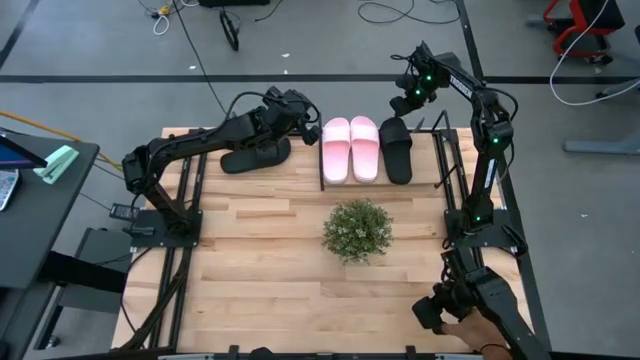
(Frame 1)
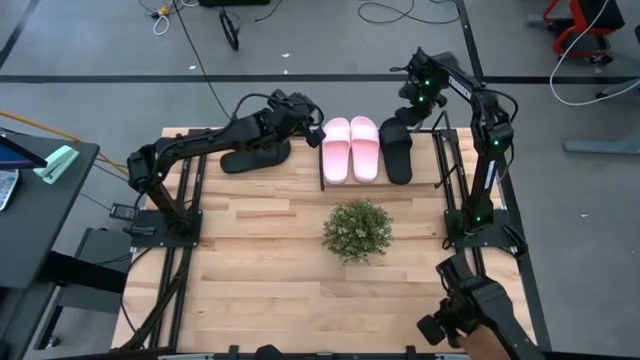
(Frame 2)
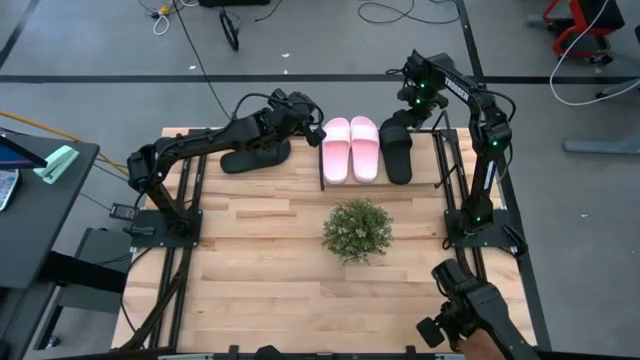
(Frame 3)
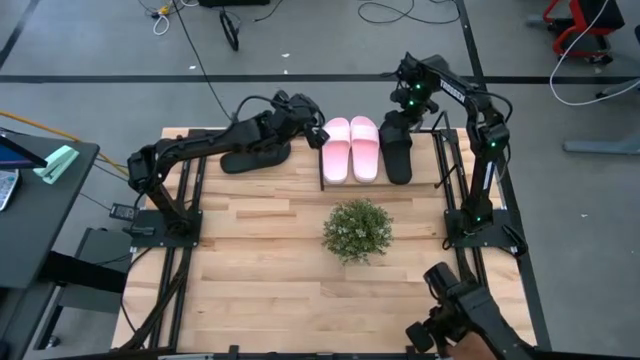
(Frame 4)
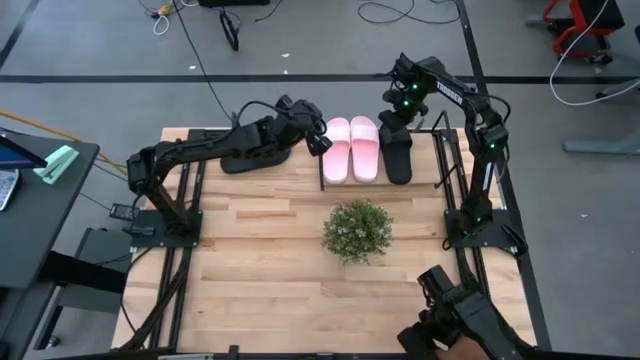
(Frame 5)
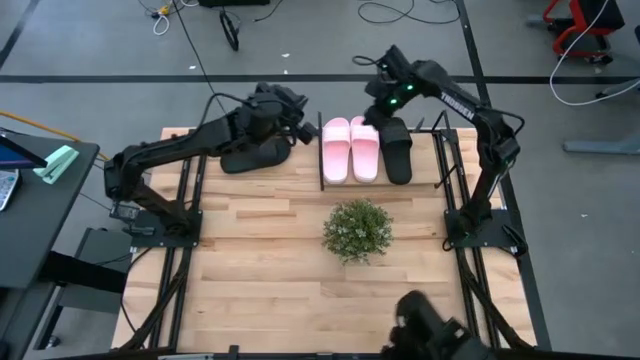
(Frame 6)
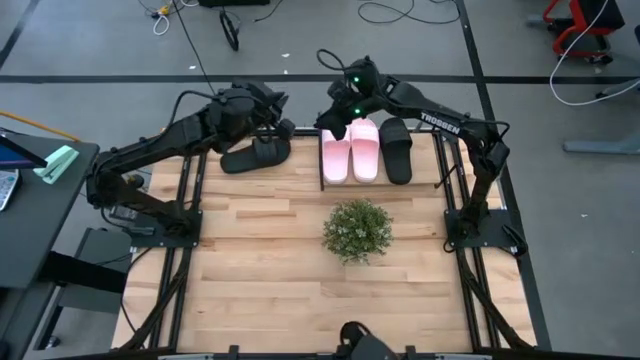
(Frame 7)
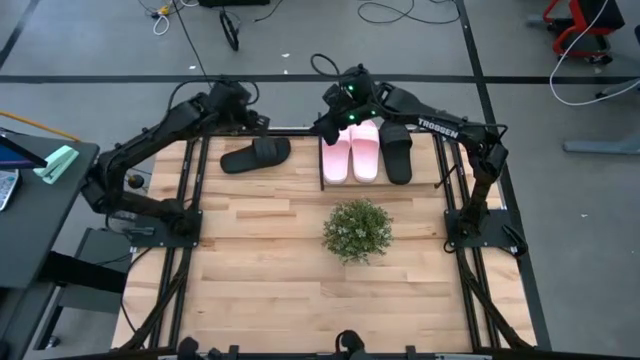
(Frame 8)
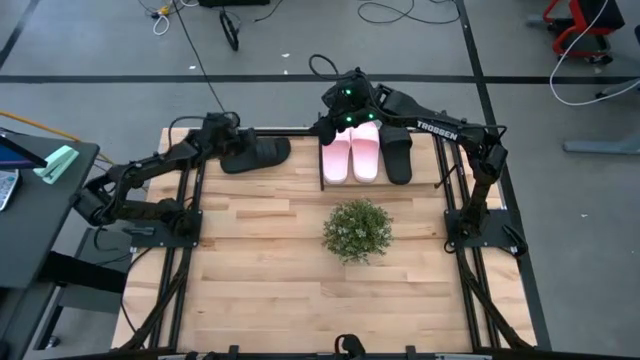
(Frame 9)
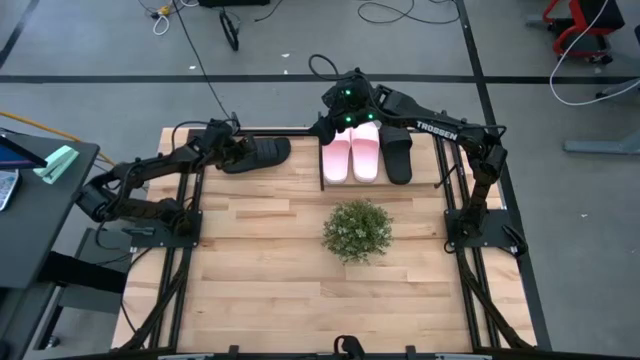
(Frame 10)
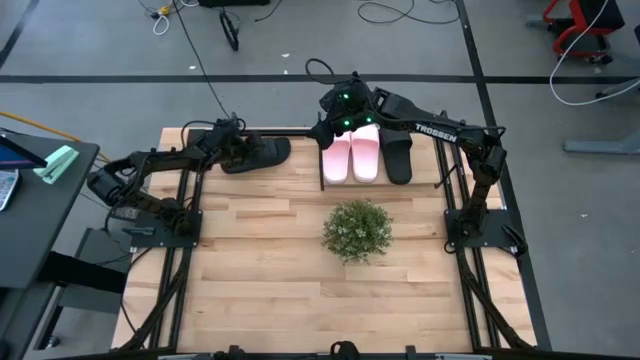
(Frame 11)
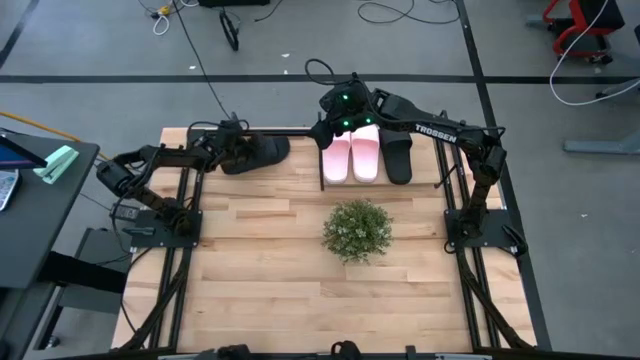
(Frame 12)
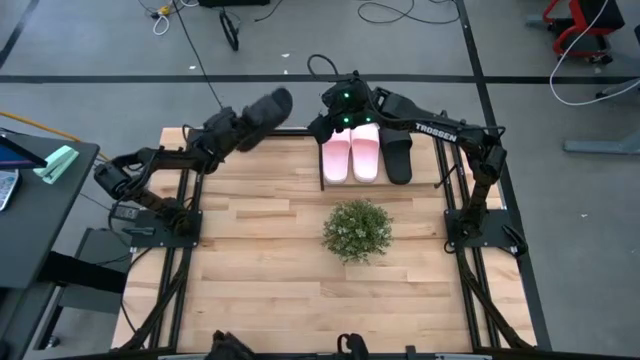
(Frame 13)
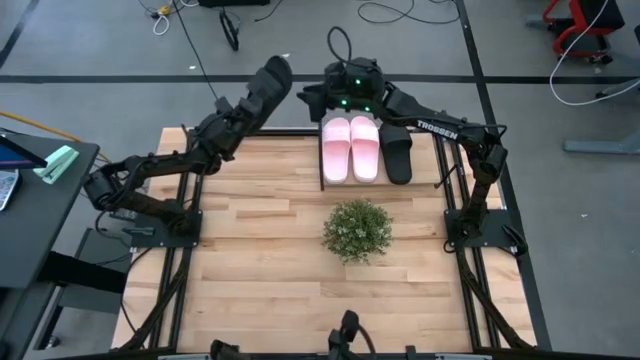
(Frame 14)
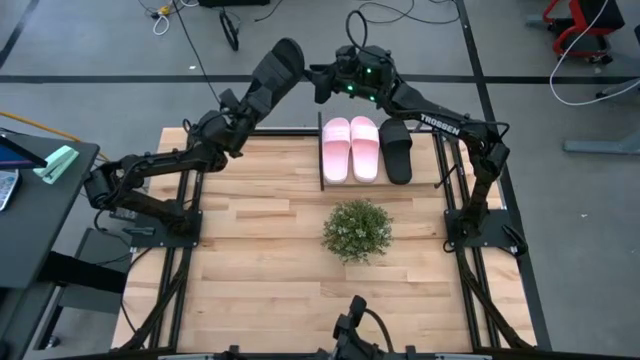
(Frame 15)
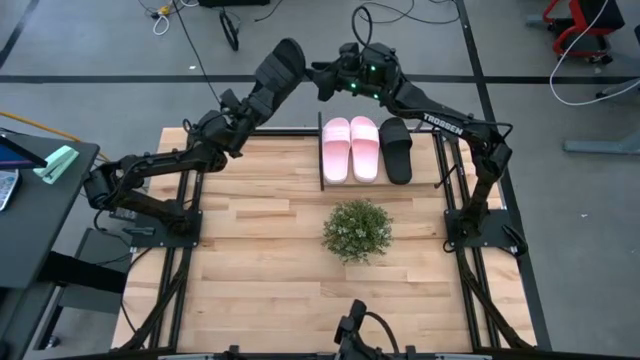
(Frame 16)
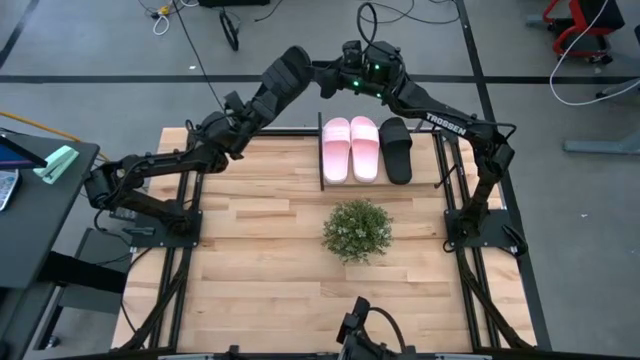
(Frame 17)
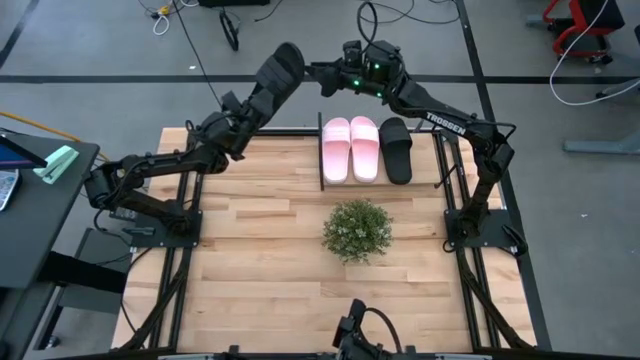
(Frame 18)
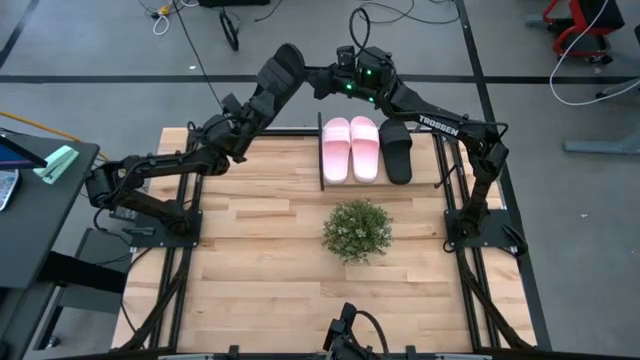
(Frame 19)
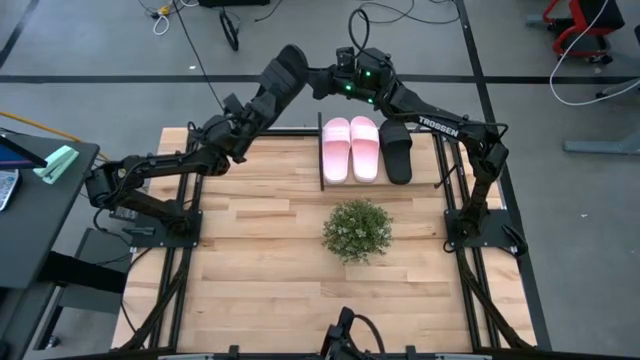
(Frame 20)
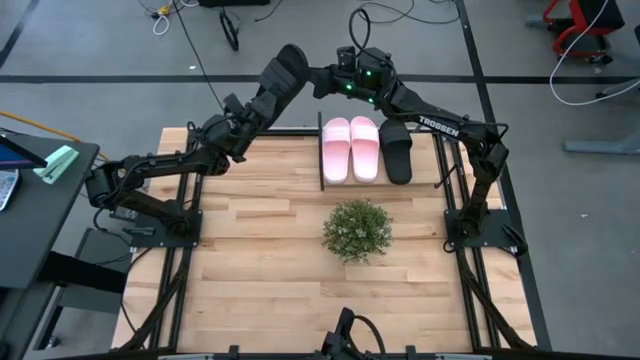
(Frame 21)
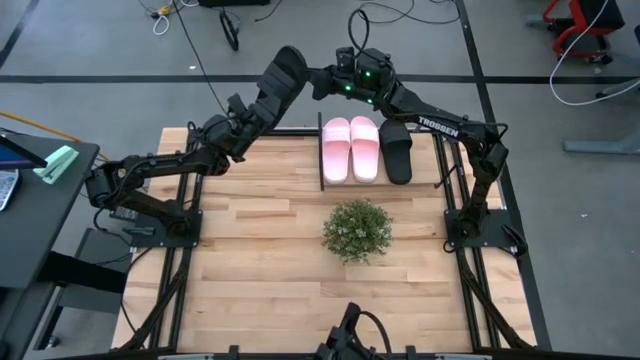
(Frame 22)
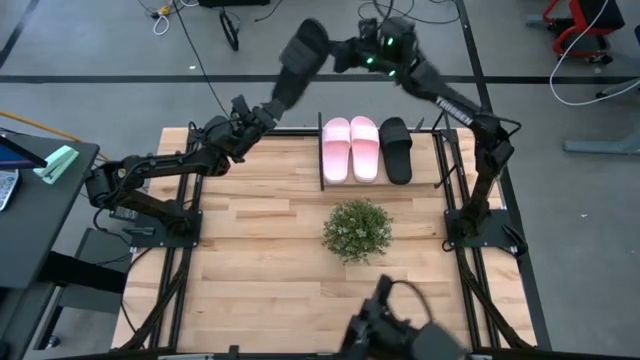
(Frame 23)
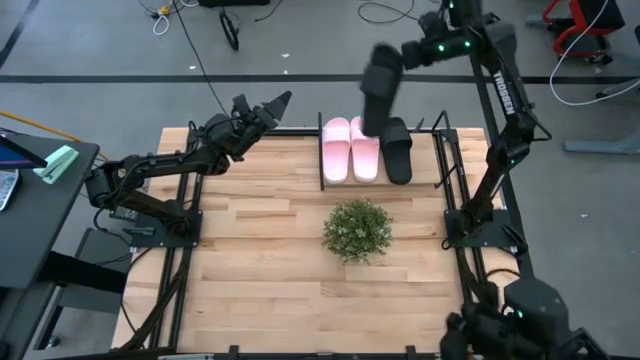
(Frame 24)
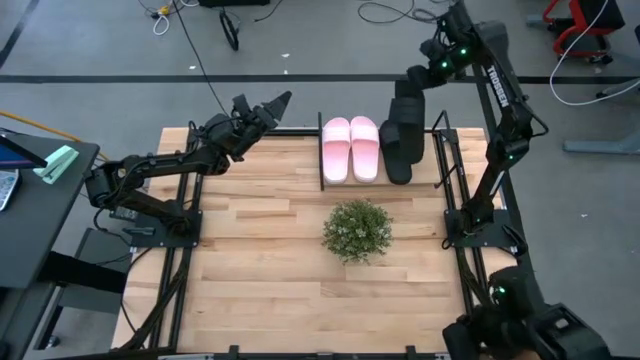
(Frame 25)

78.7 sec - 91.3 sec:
Task: Pick and place slides into the shelf
Put the black slide on the shelf

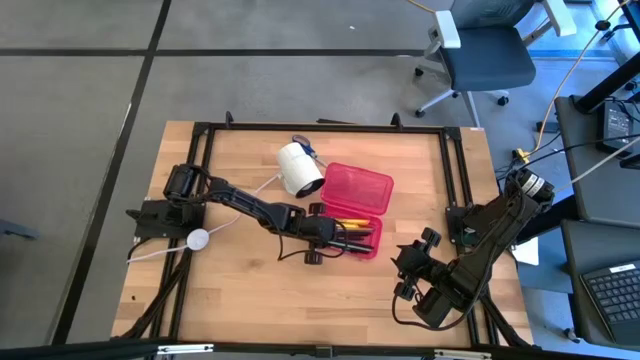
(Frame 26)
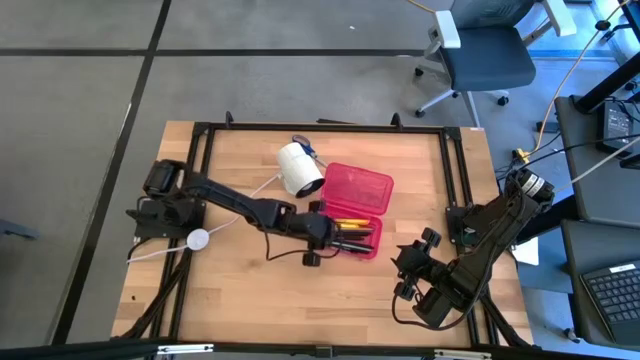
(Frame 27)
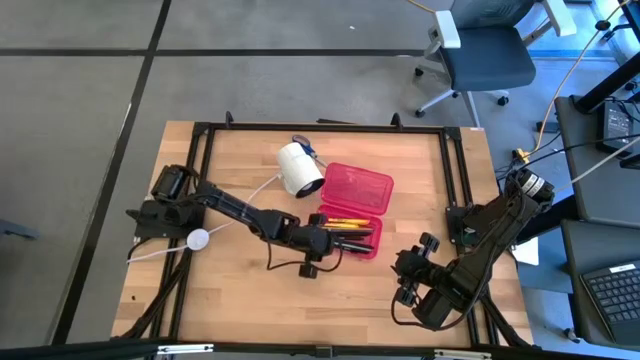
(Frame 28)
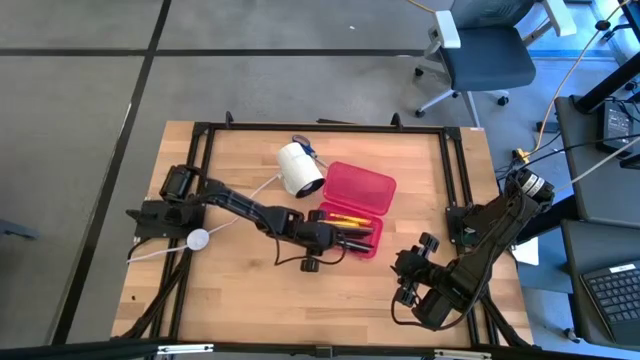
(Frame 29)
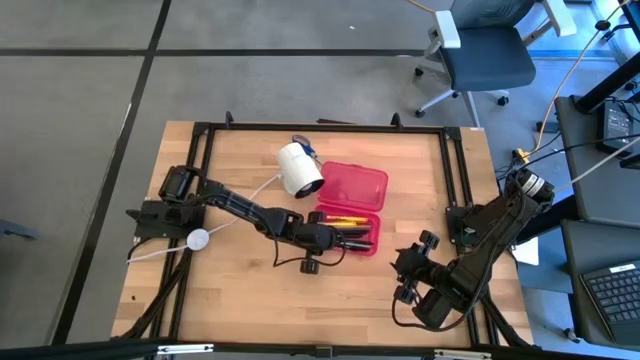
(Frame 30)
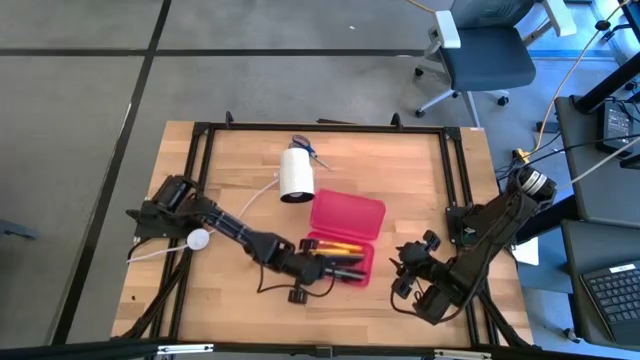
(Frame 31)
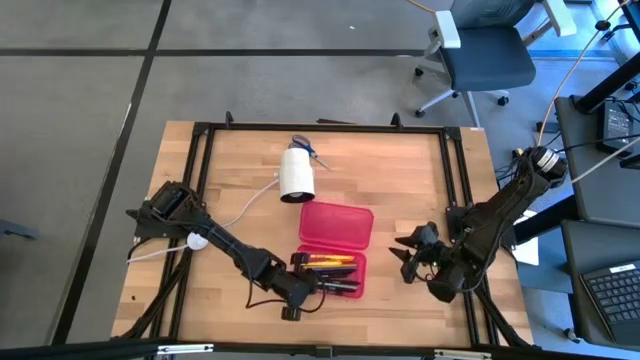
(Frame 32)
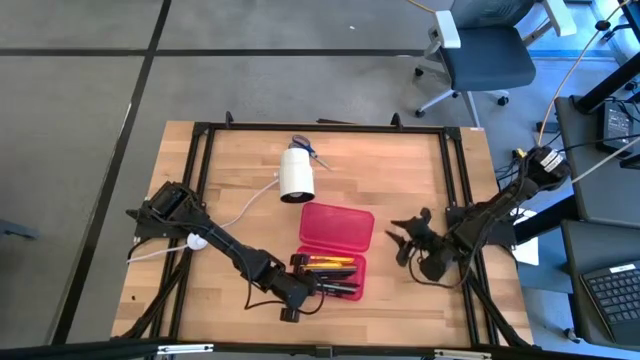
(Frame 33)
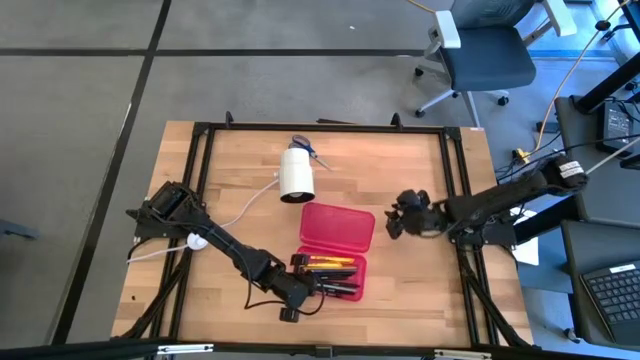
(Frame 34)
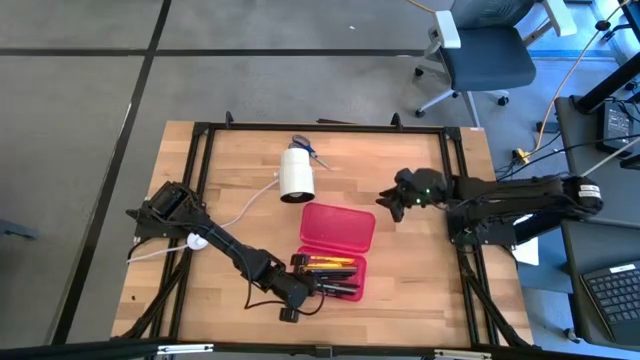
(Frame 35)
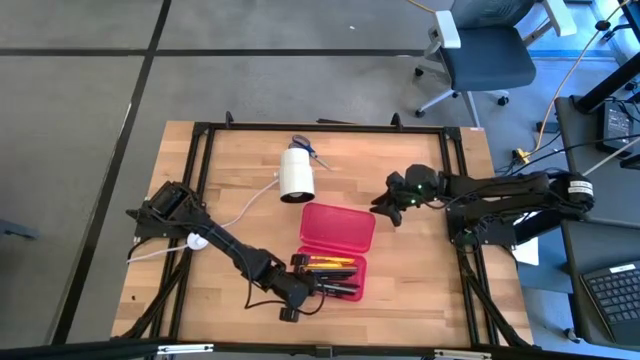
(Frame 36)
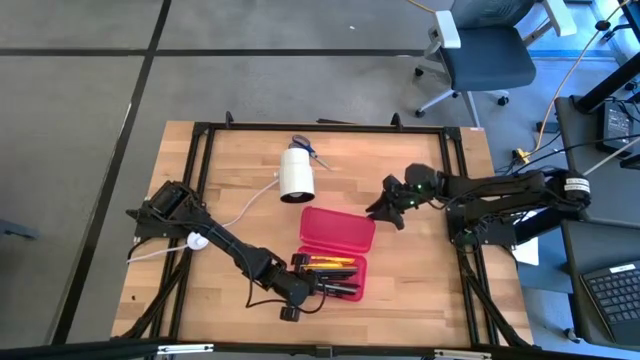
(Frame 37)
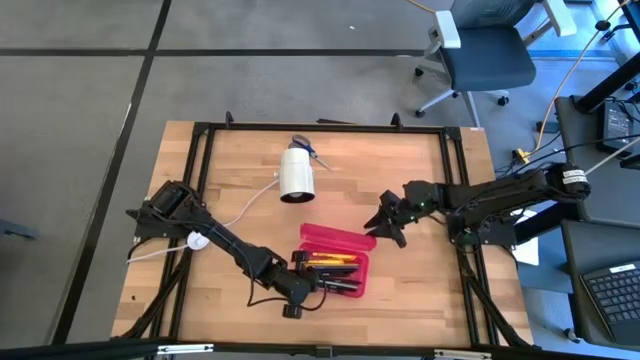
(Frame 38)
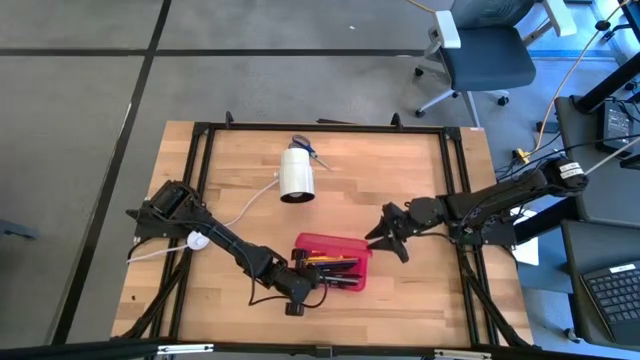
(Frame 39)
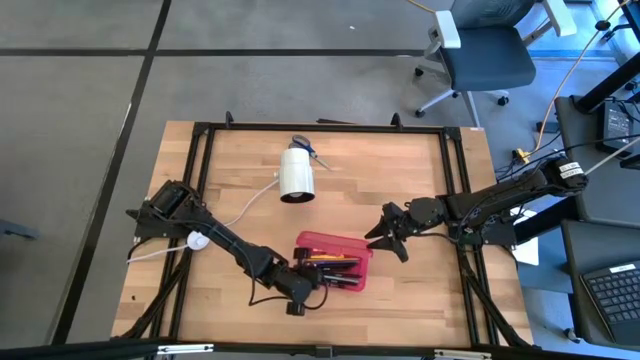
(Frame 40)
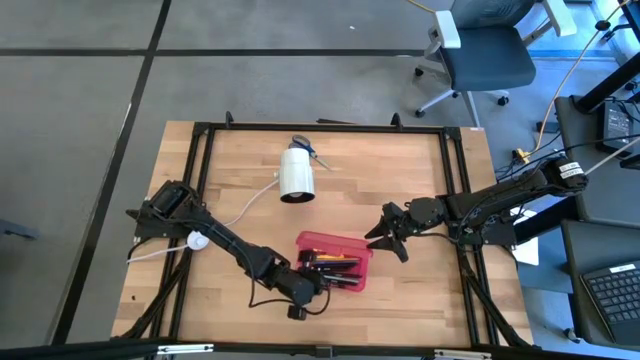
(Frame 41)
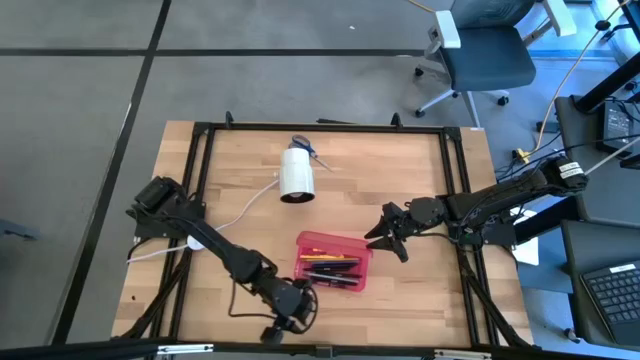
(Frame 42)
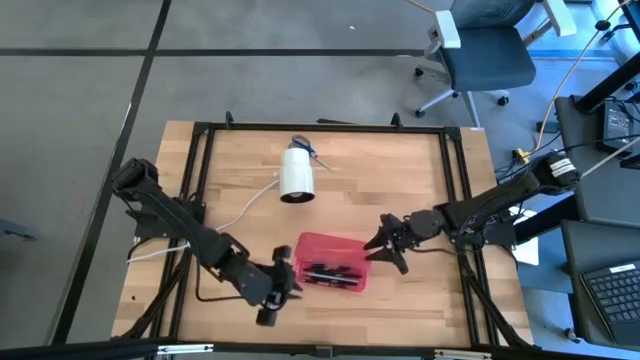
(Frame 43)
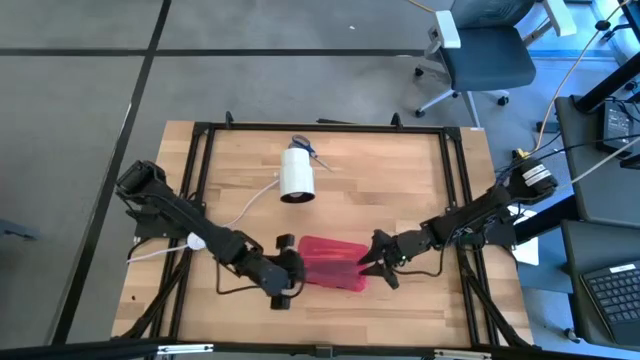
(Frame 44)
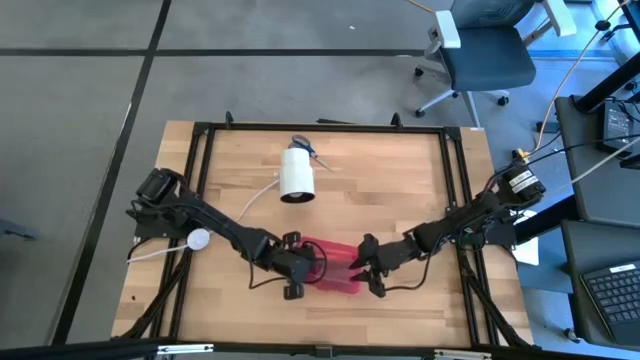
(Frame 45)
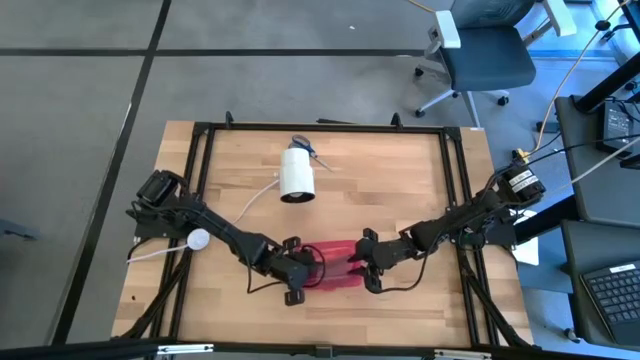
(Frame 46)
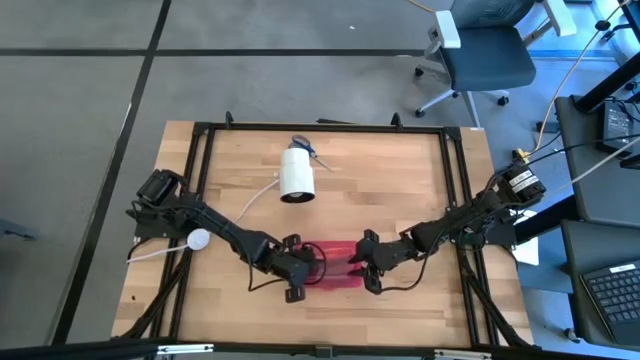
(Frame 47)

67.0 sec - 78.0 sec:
Task: Pick & place school supplies into a supply box
Close the pink supply box
